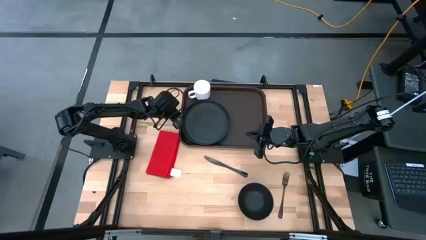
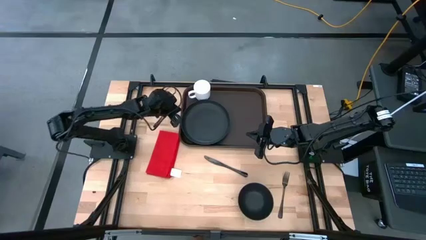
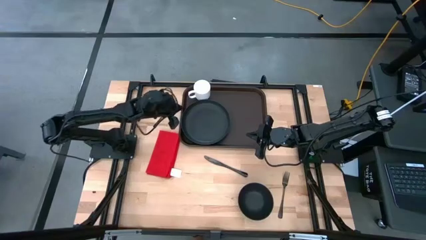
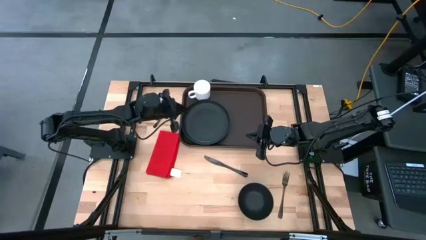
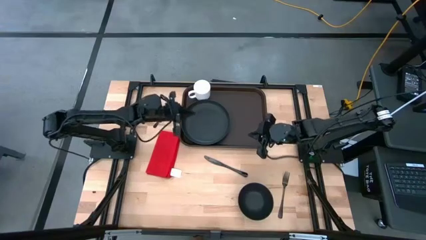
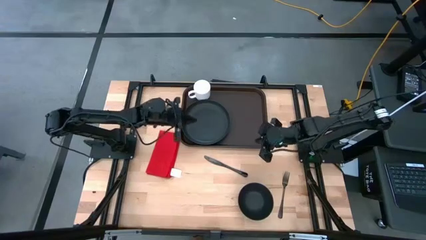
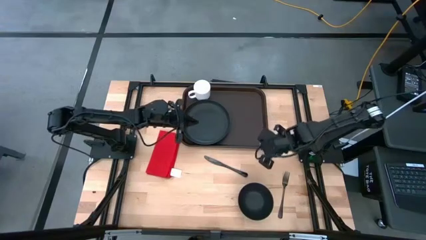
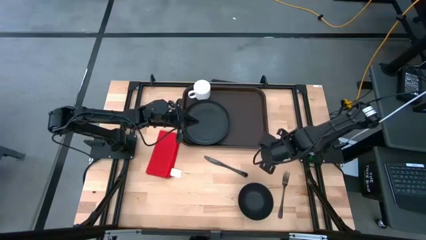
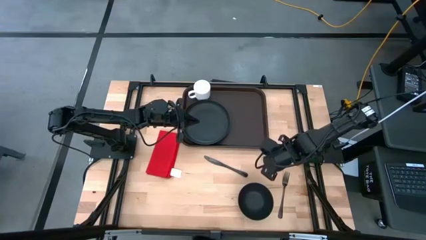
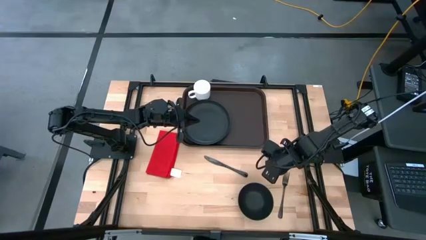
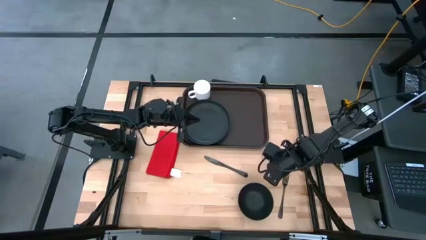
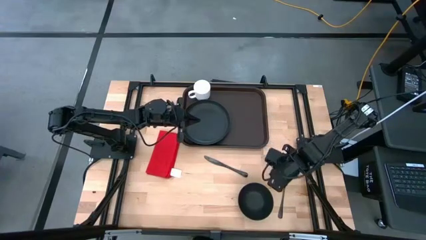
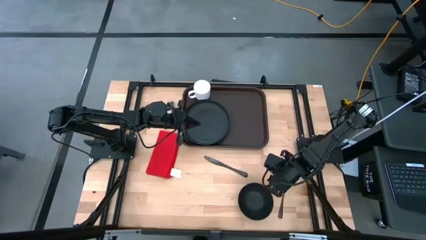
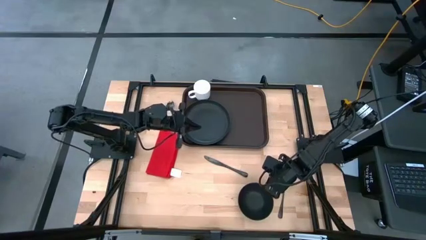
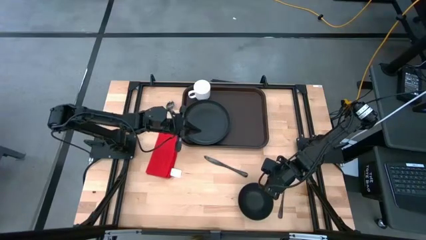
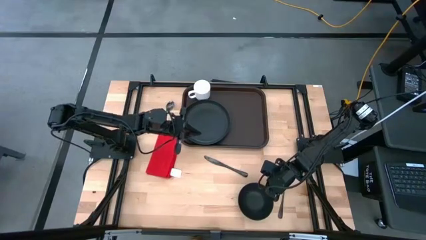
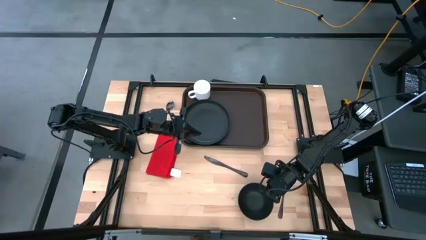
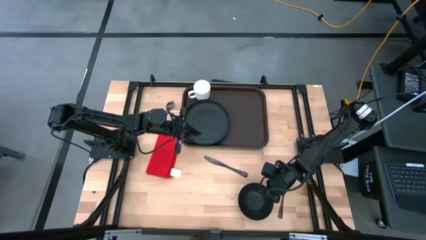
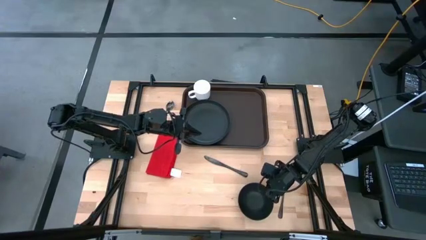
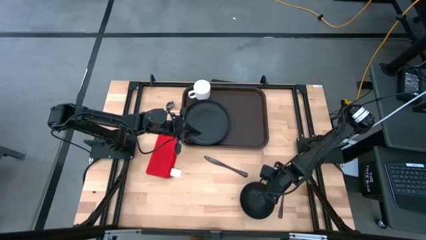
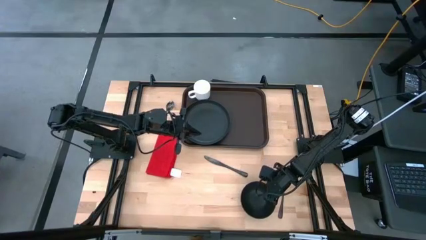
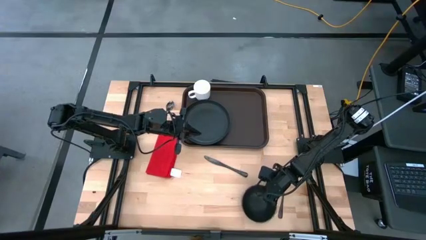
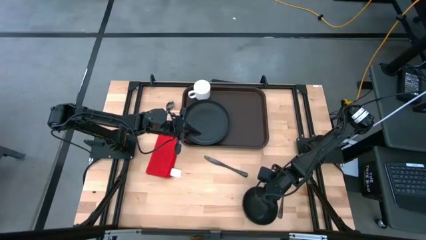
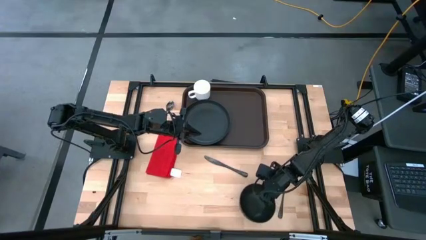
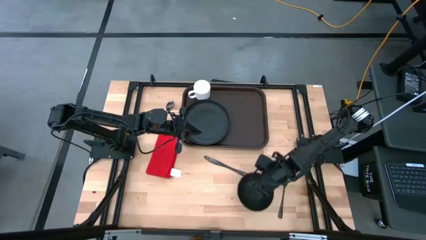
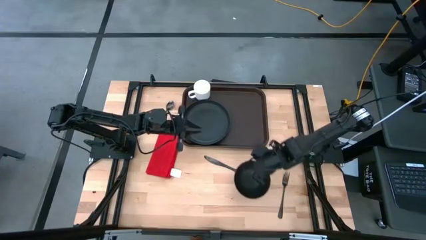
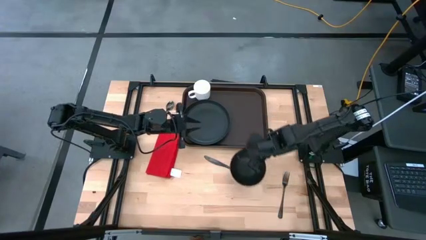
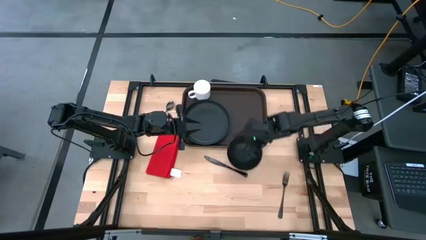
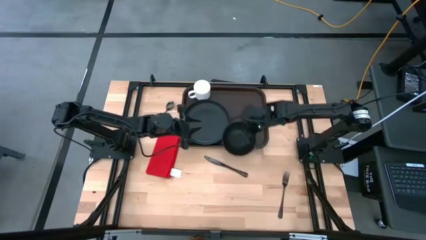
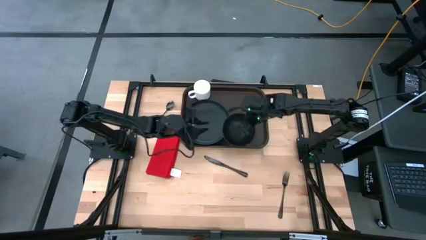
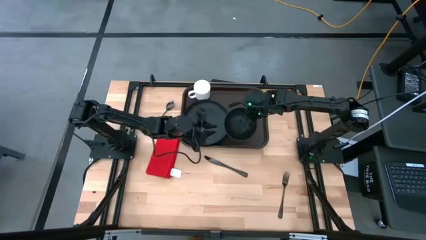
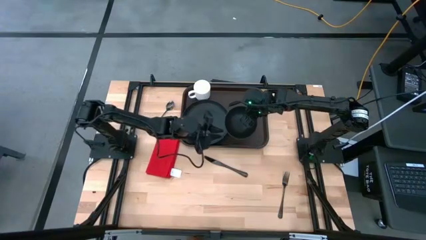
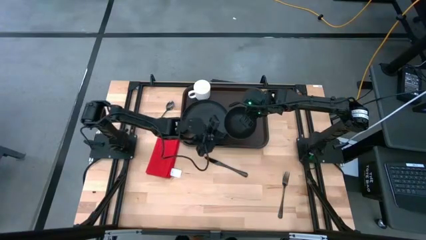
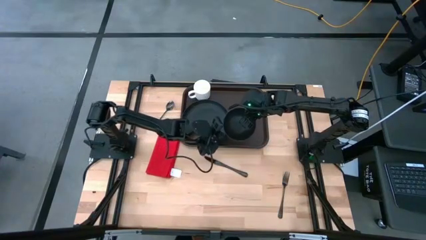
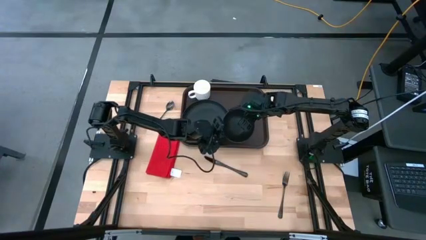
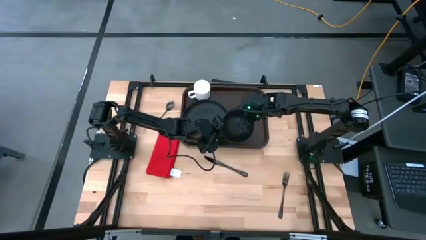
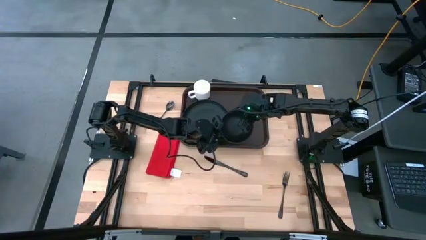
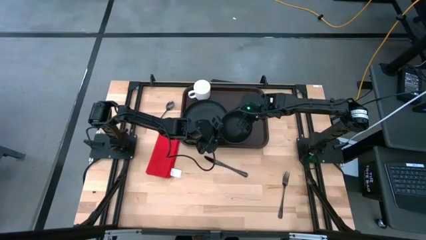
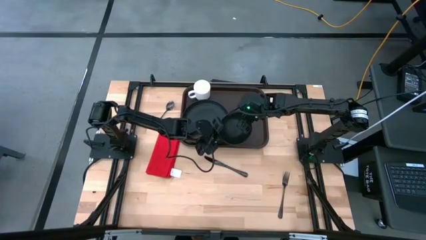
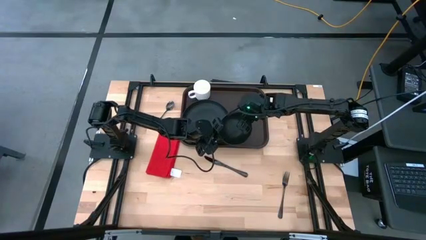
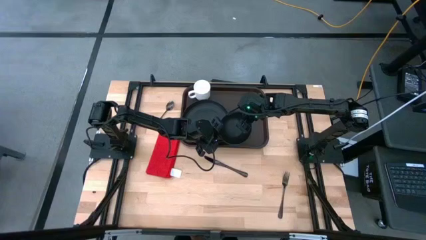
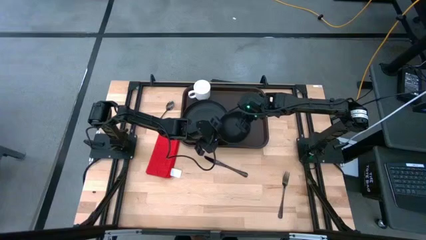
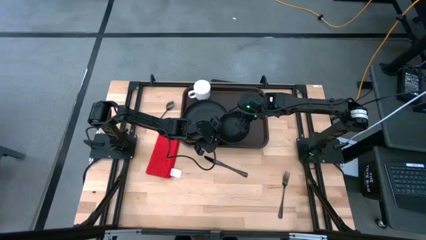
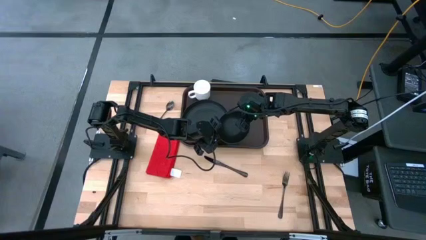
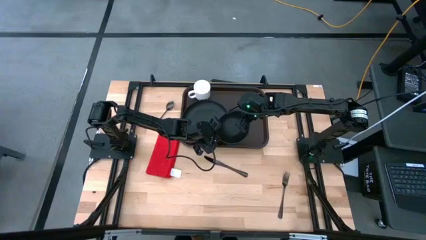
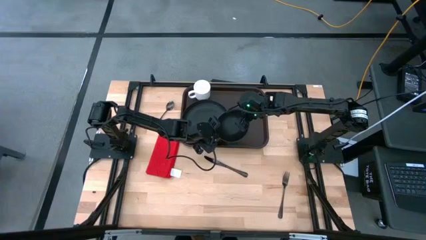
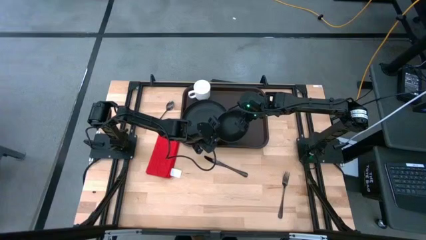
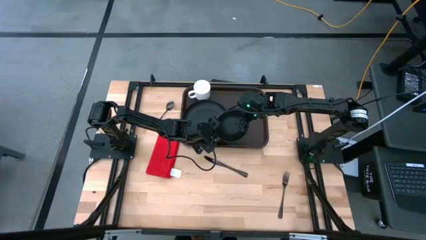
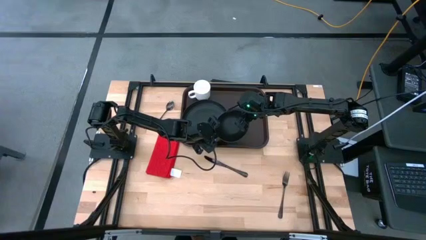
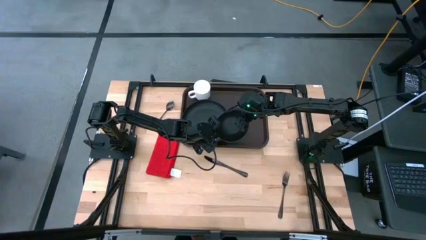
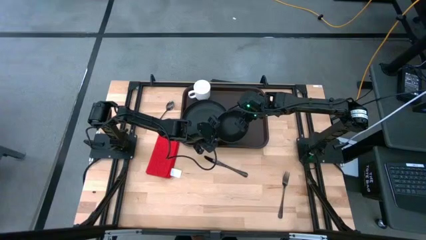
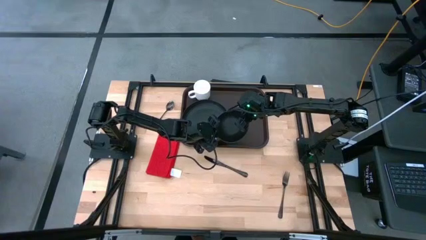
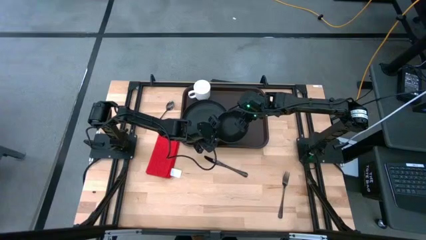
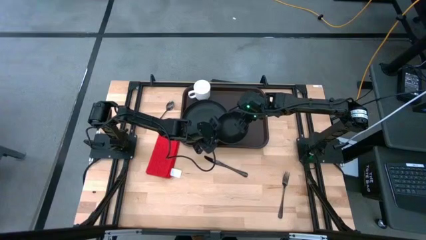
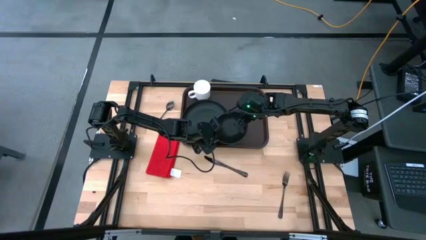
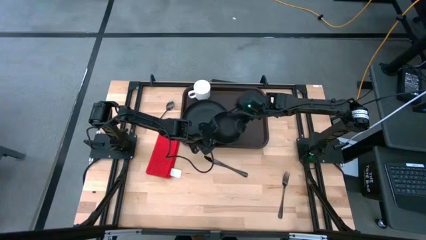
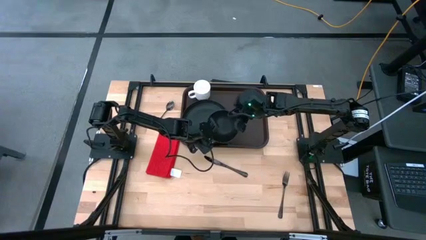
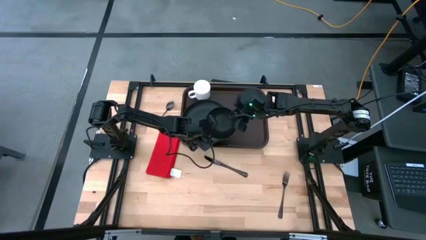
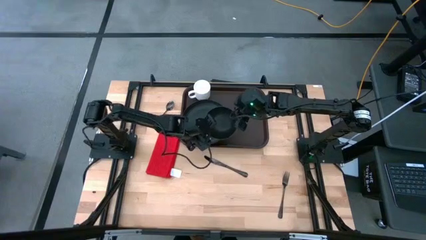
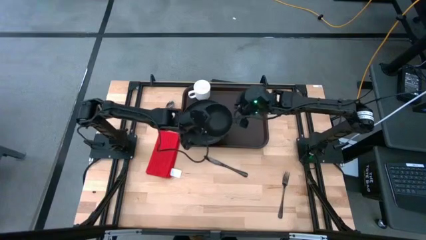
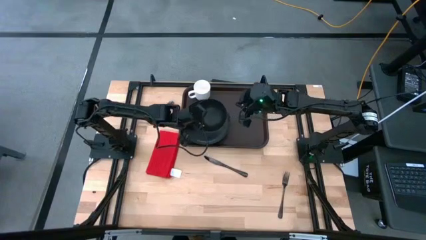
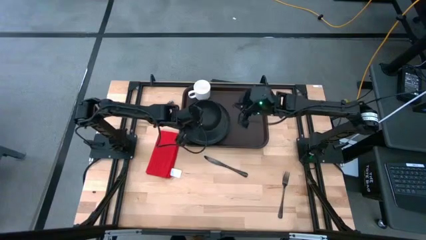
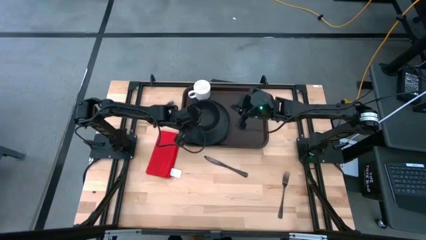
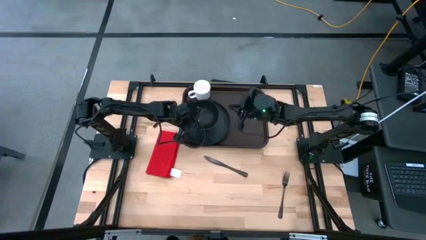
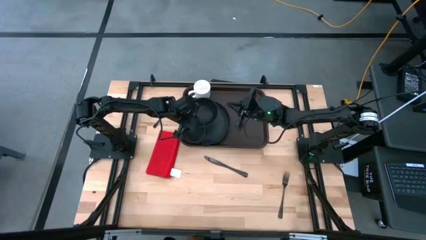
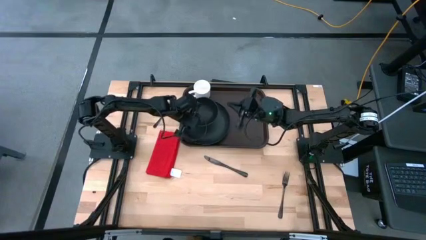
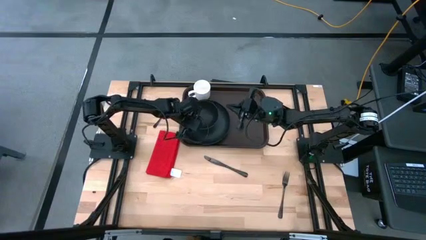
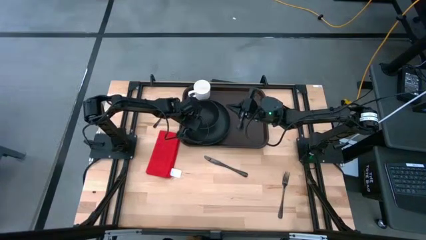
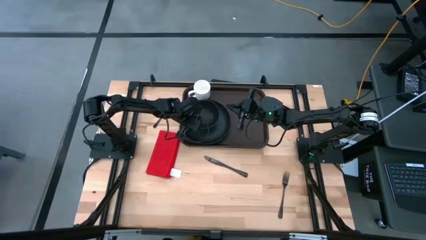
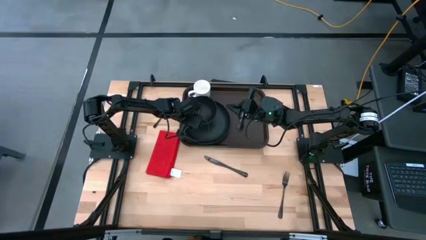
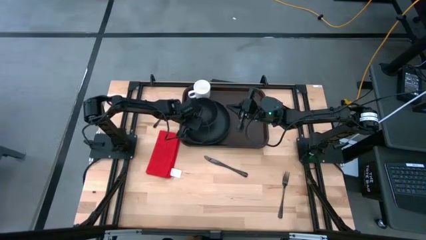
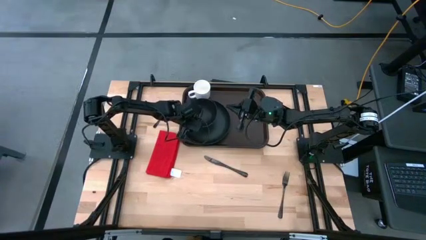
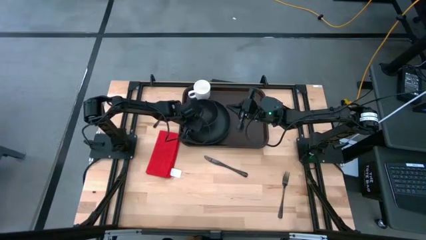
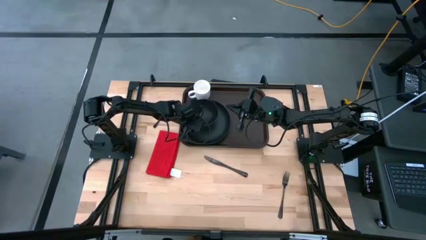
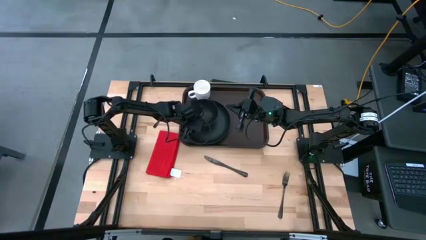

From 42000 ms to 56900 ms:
Task: Set up tray
Put the black bowl on top of the black plate
